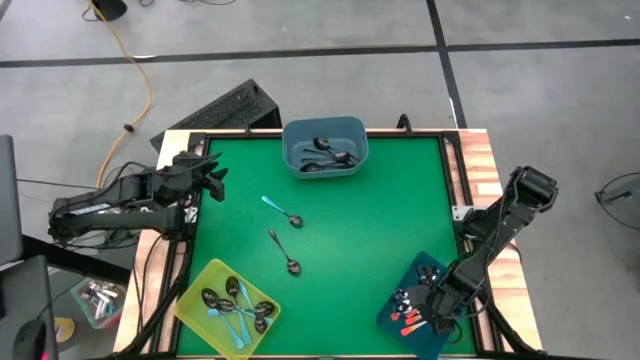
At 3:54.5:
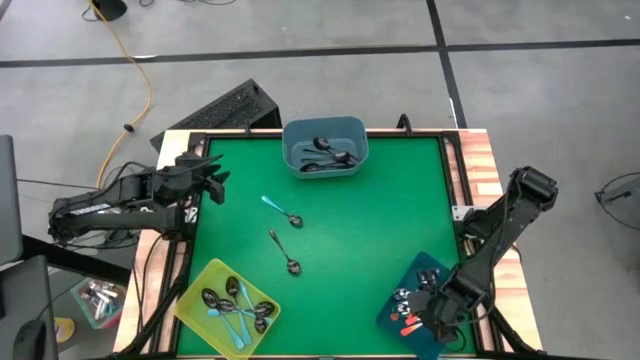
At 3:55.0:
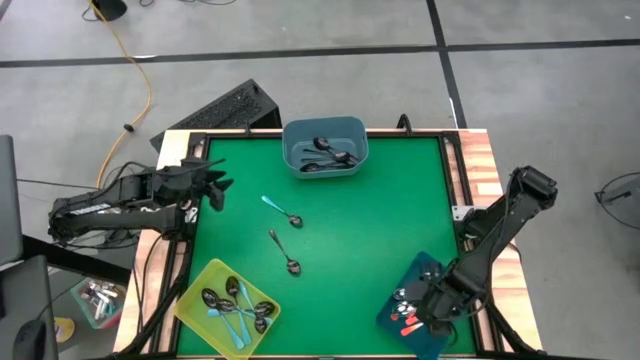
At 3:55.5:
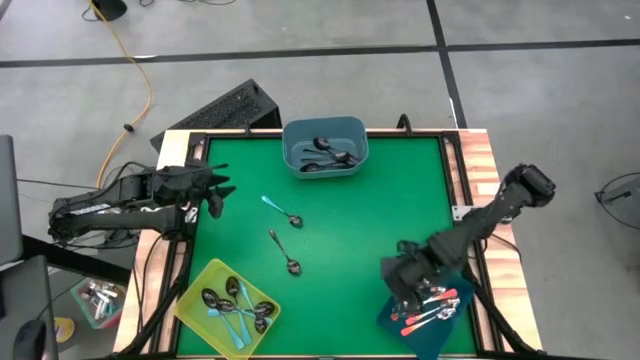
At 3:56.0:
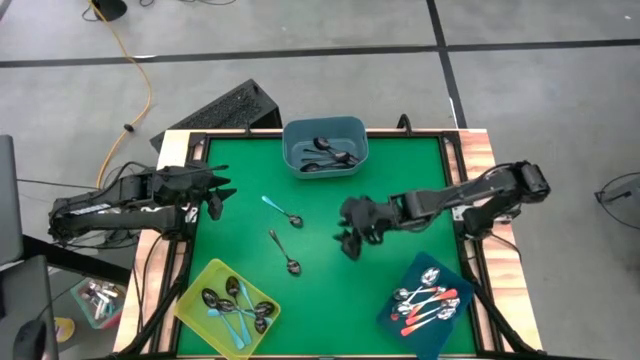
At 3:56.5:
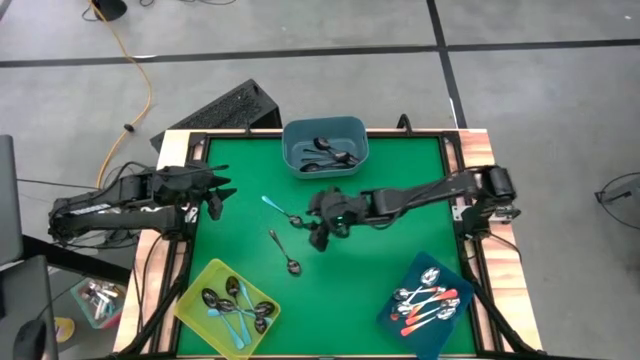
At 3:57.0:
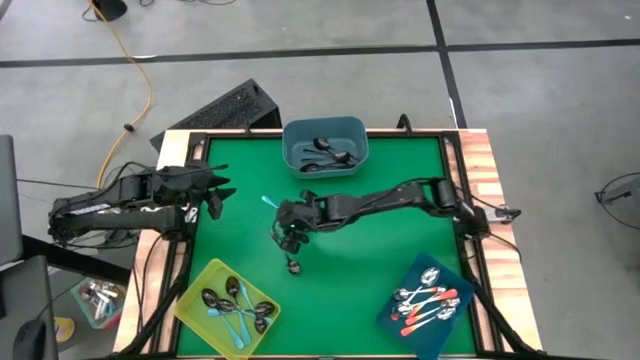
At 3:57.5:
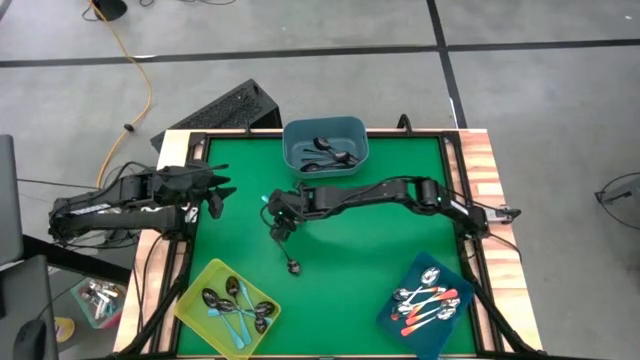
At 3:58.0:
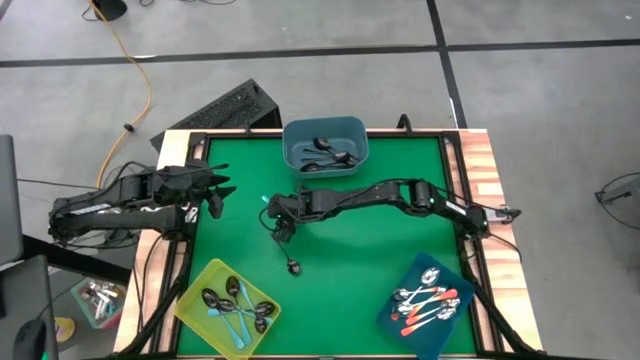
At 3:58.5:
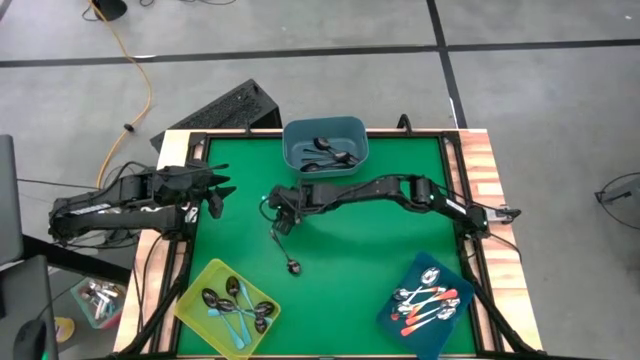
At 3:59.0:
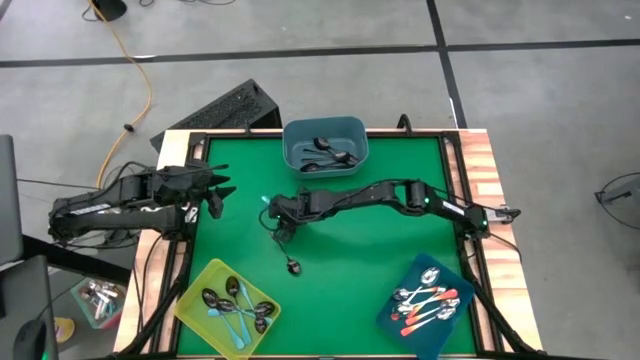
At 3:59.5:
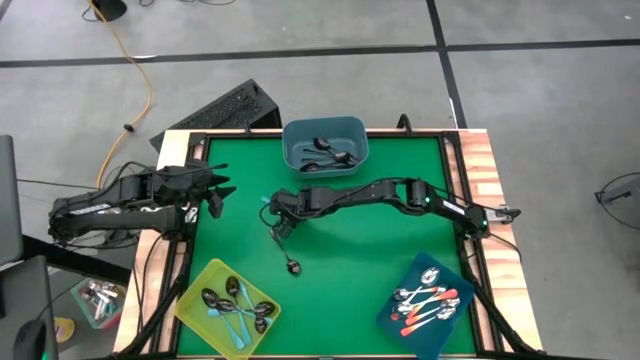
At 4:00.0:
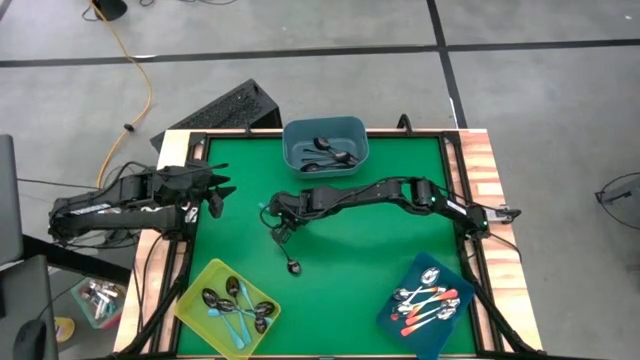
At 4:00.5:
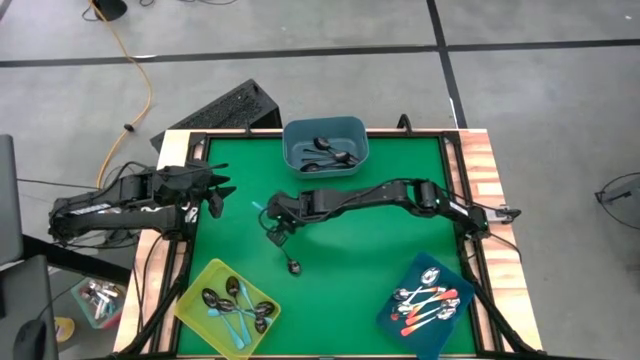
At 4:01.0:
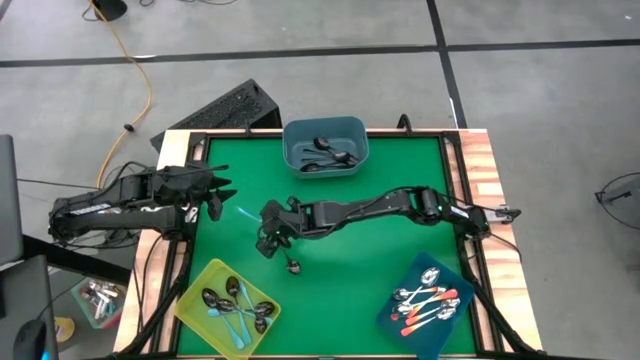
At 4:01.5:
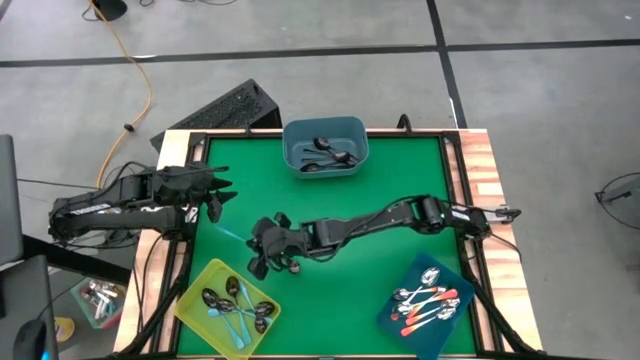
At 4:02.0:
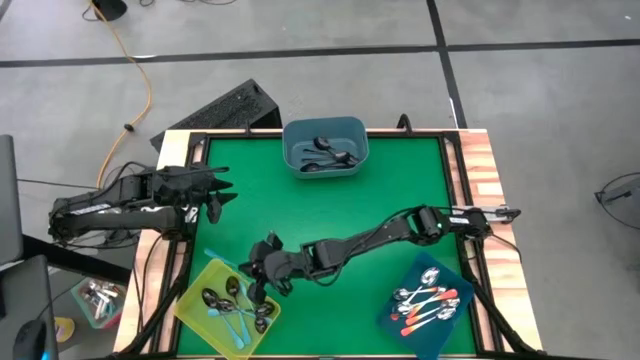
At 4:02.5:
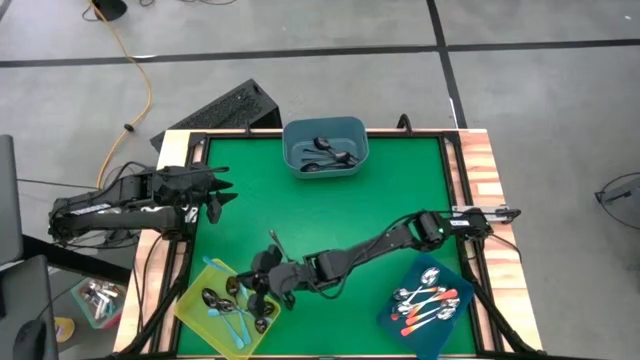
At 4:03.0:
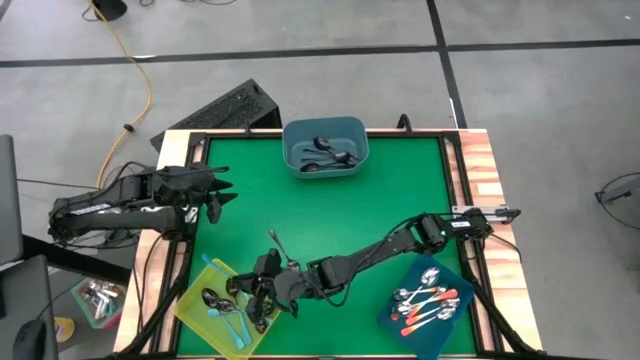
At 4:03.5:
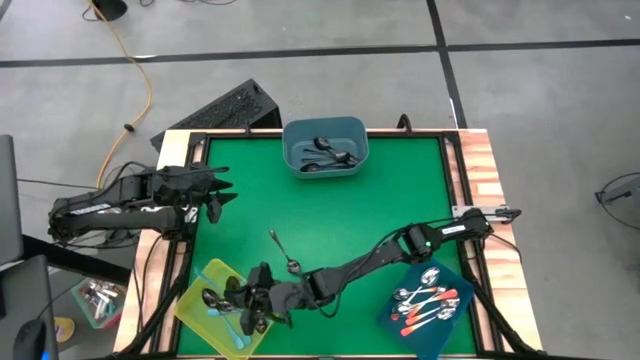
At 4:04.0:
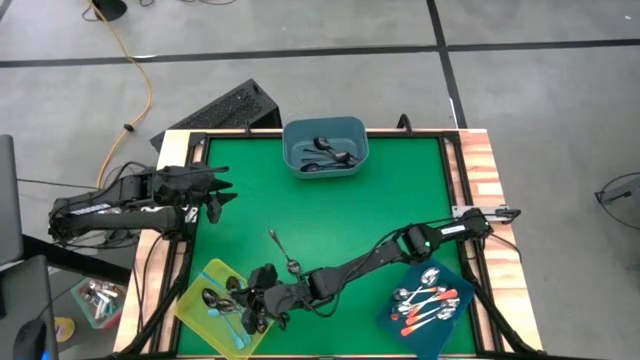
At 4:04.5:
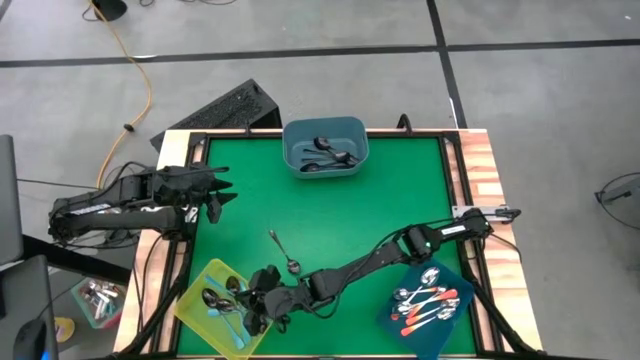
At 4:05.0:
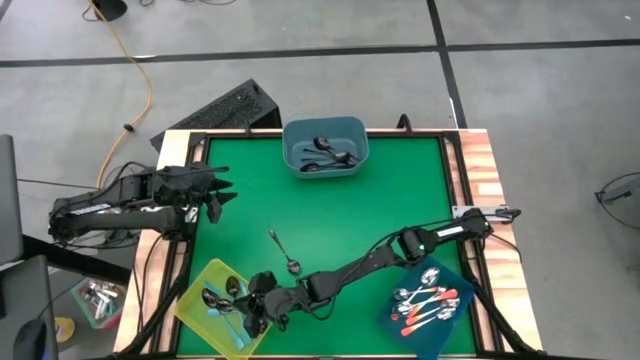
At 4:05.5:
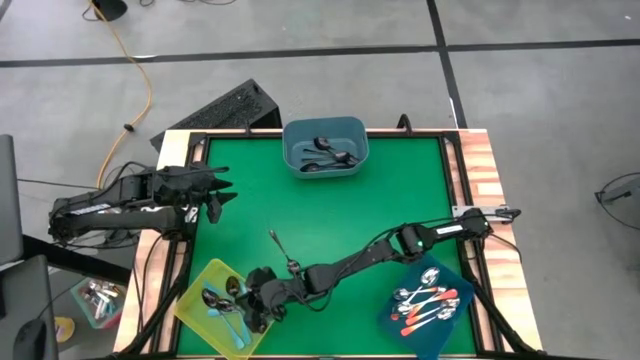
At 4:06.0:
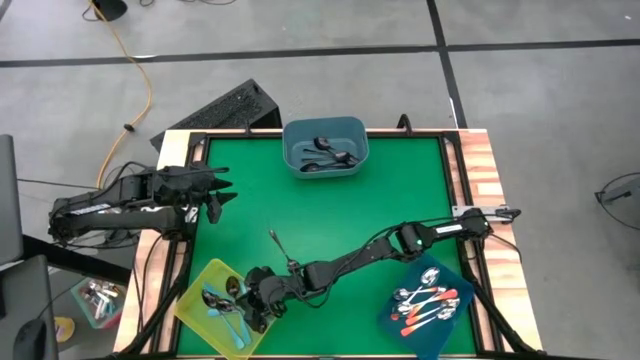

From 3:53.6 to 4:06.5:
Task: Sort silverware by color (type)
Put the light blue spoon into the yellow bin

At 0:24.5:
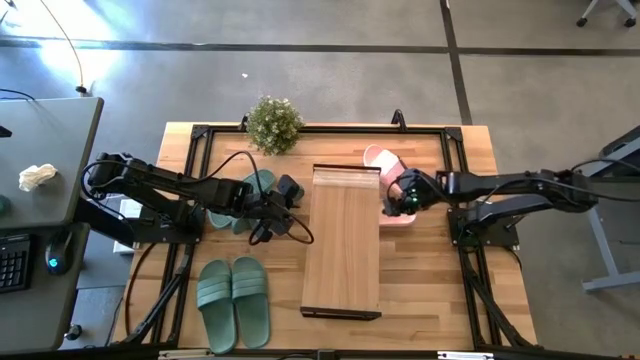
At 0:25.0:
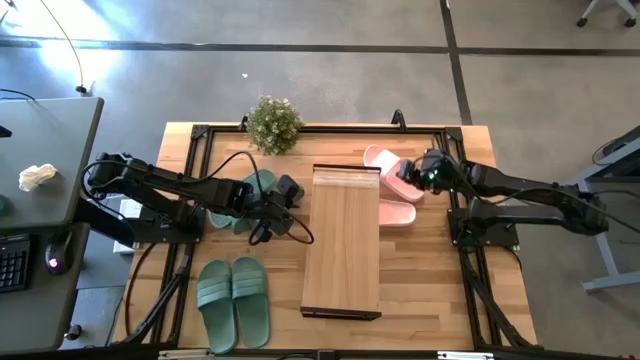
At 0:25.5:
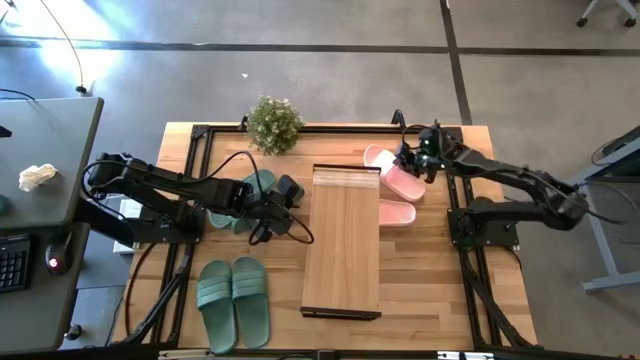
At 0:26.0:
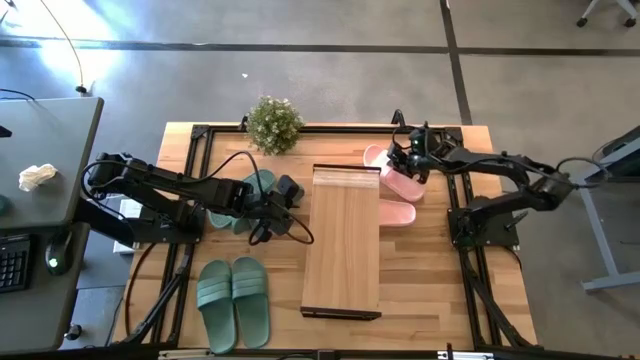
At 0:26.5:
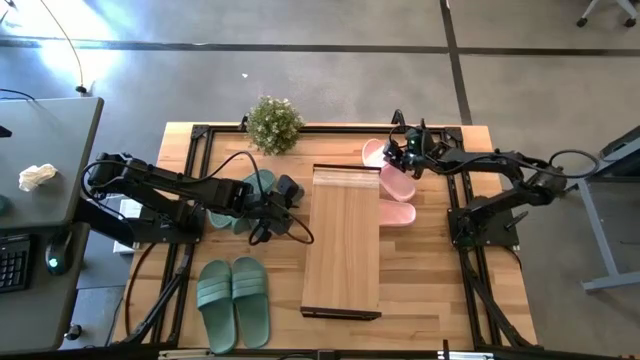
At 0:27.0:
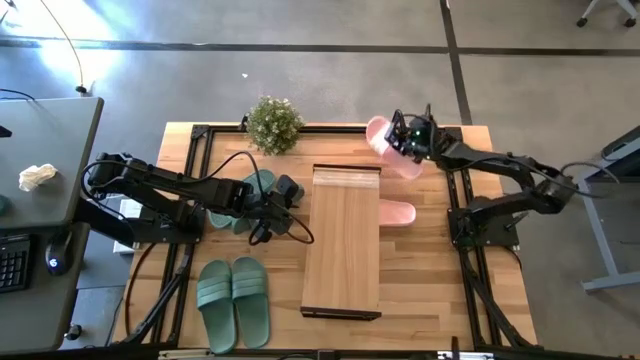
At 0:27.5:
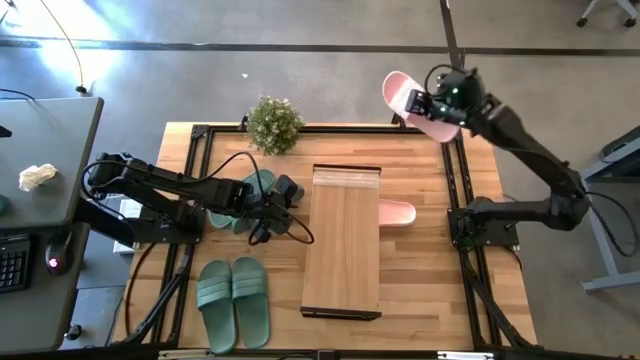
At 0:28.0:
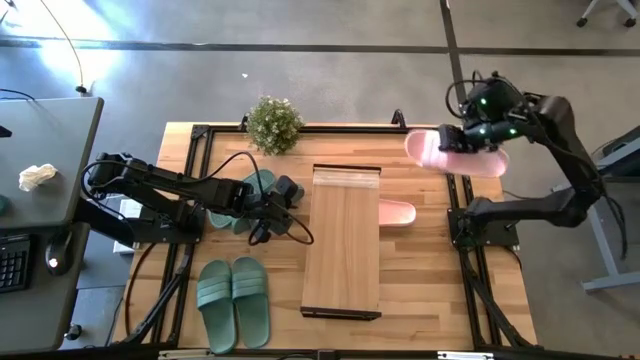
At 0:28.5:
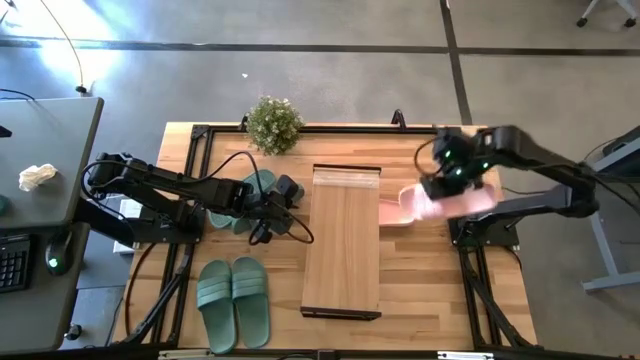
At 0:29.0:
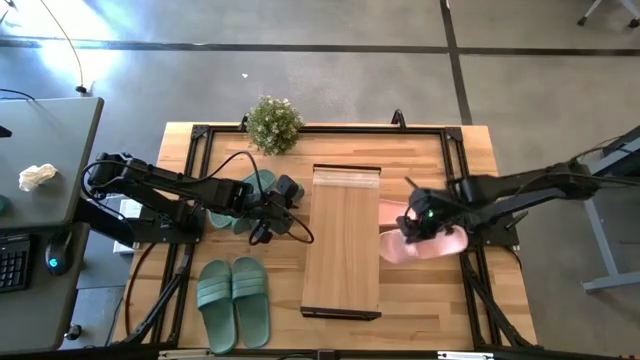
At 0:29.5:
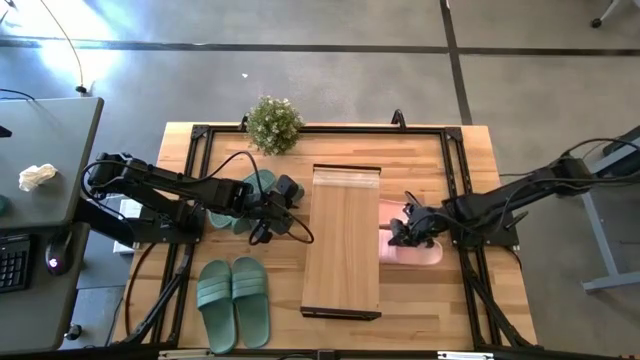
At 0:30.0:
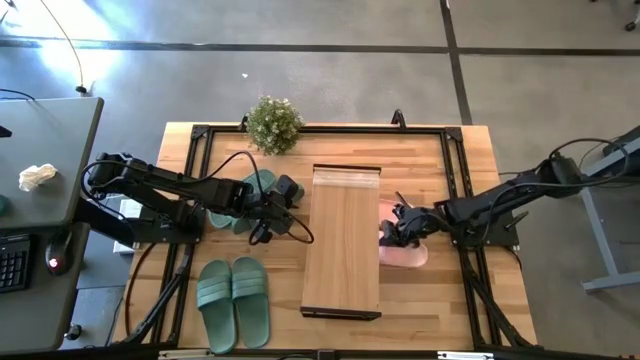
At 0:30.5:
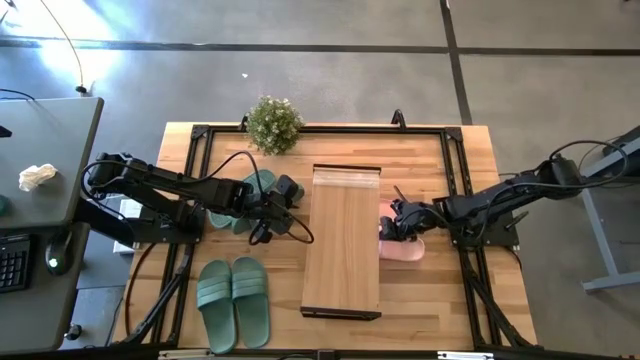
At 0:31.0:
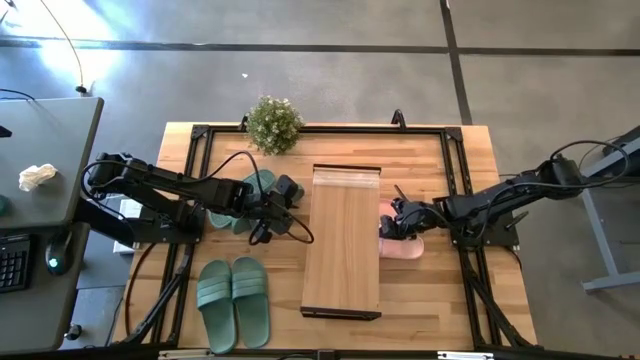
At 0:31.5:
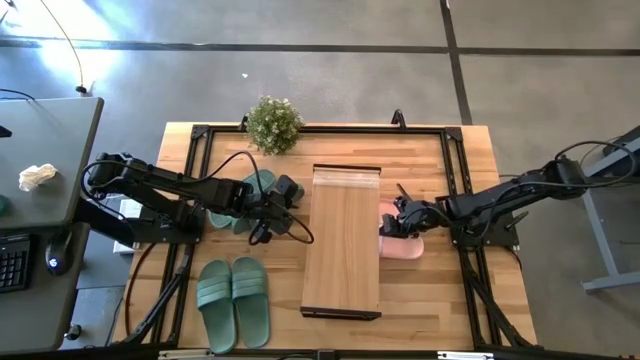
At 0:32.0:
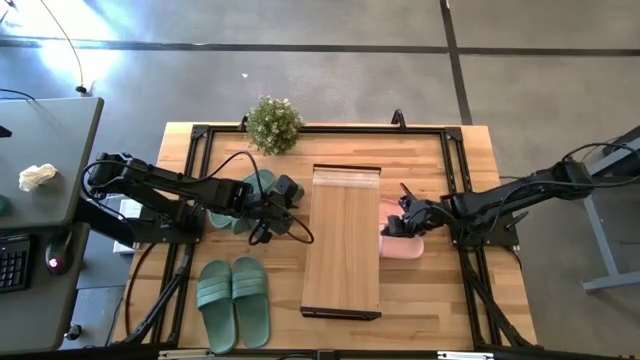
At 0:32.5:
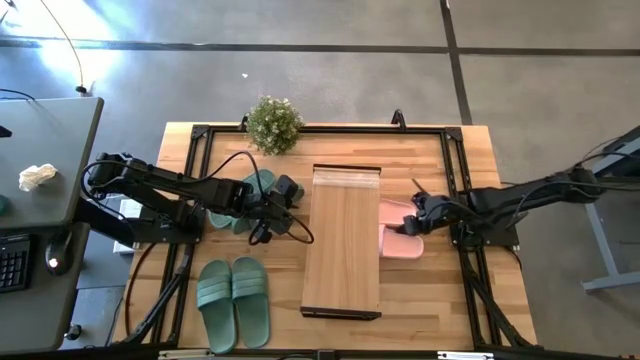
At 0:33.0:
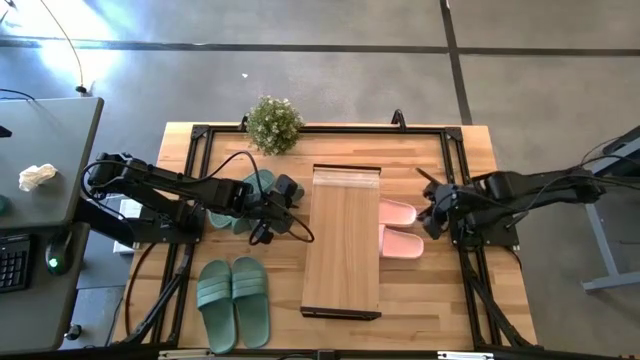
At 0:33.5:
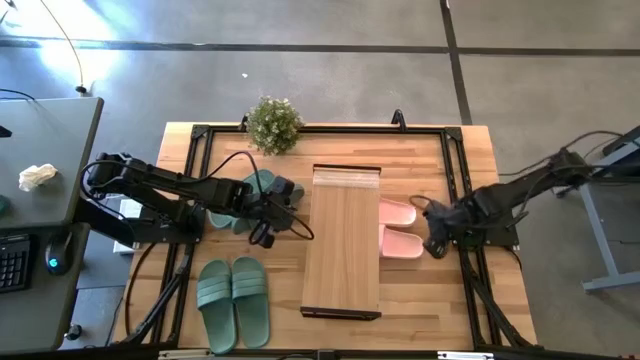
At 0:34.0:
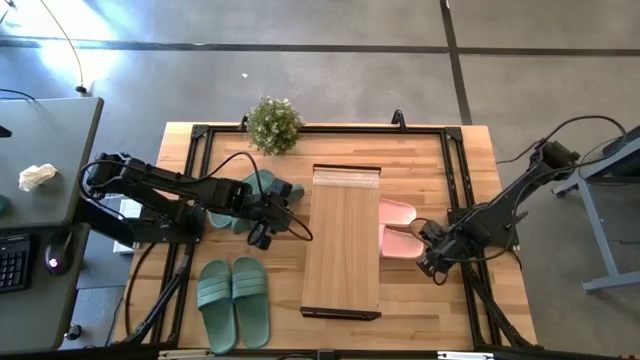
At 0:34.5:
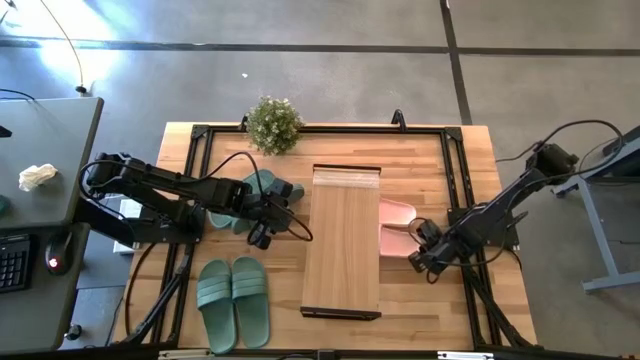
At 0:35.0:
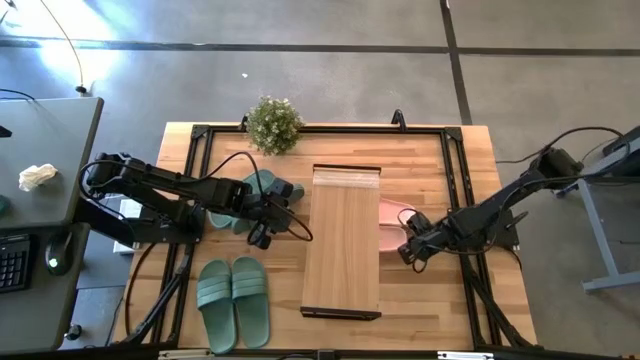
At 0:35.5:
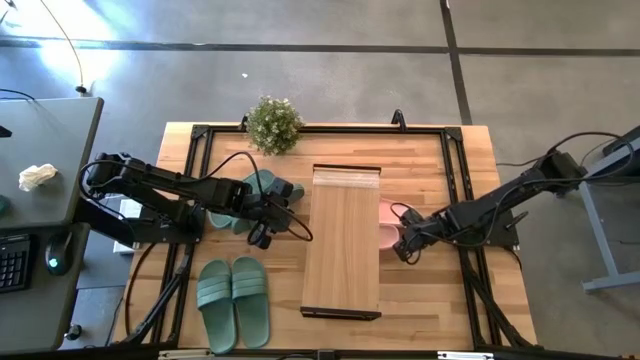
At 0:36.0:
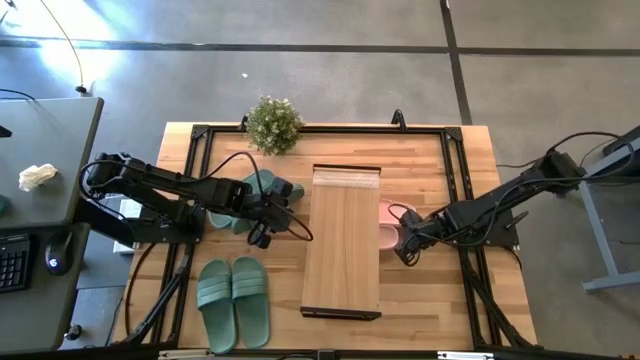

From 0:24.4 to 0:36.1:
Task: Pick and place slides into the shelf
Put the pink slipper under the shelf
